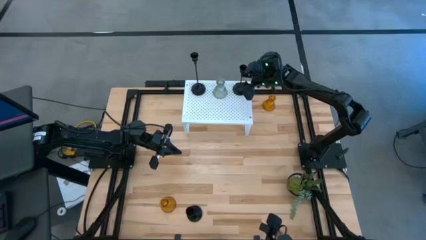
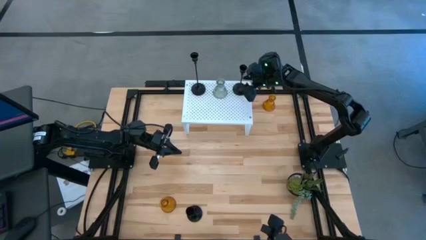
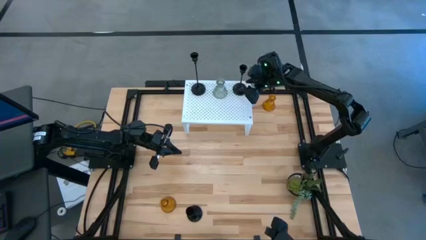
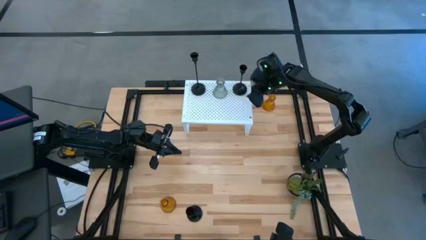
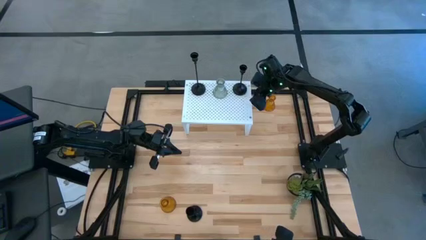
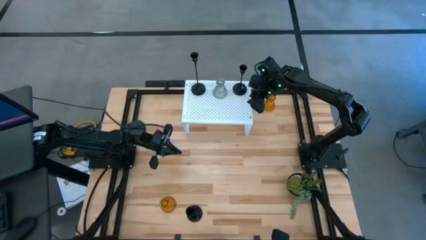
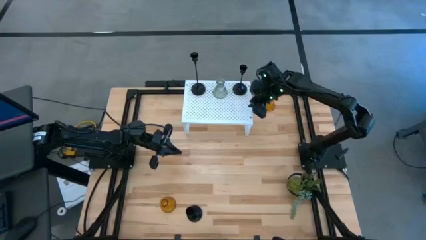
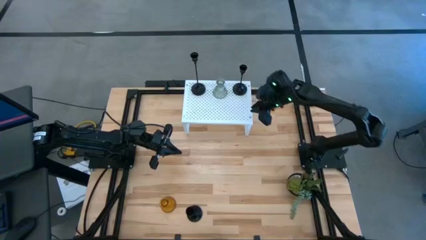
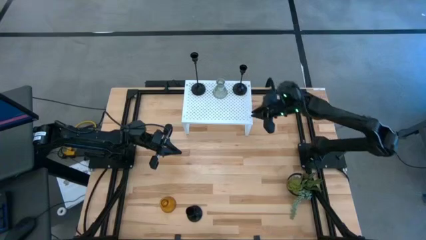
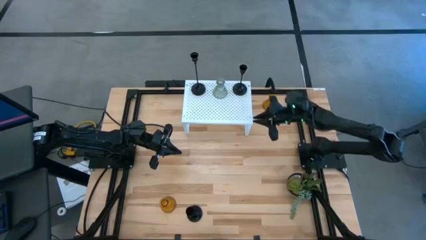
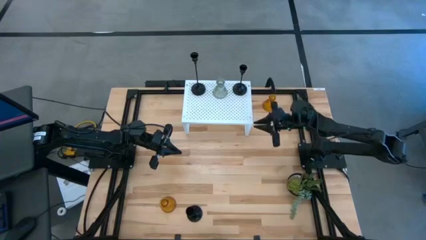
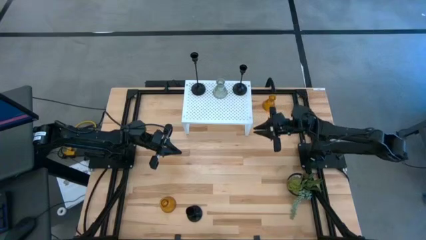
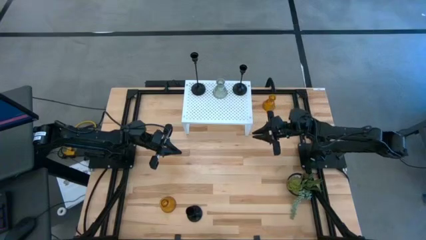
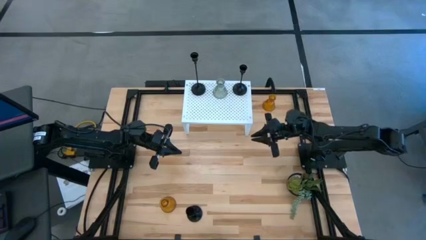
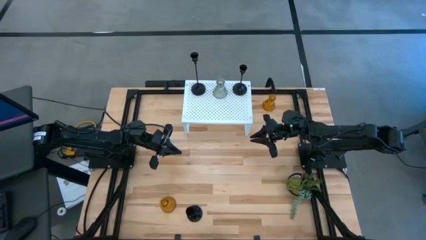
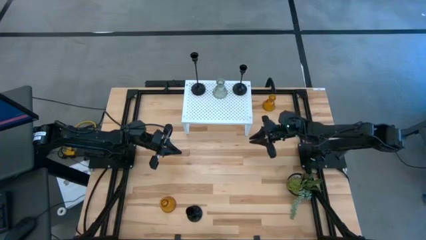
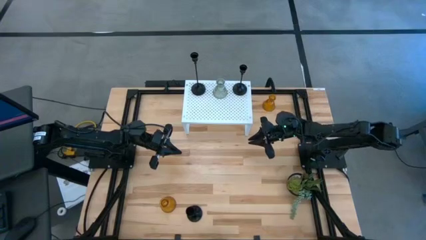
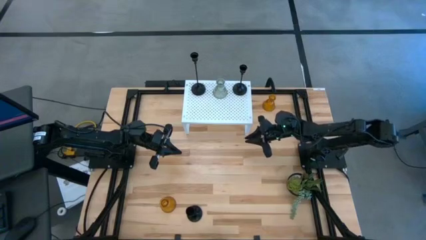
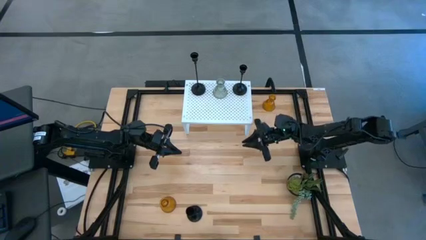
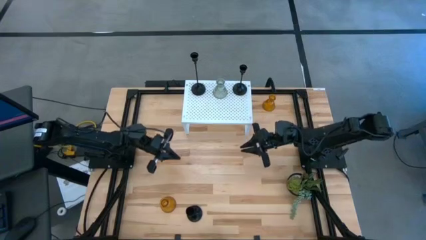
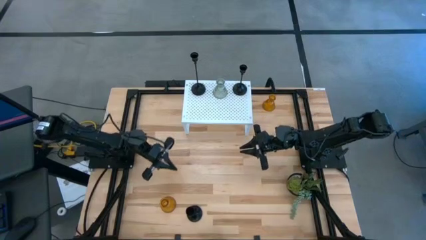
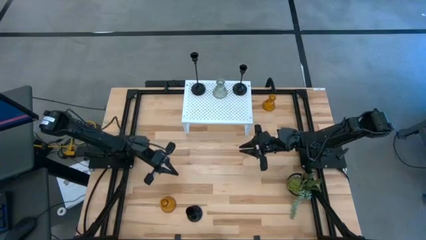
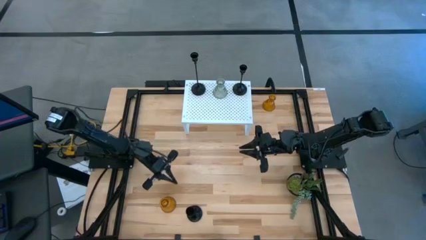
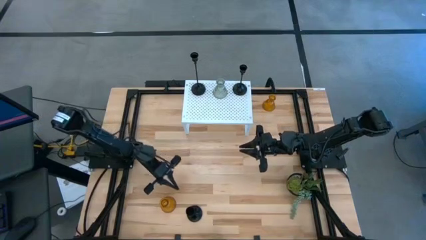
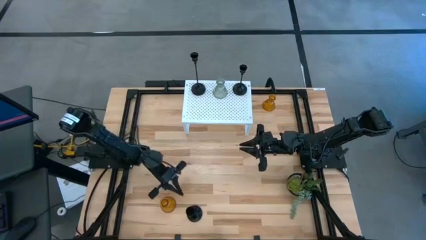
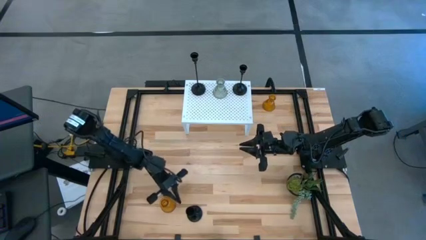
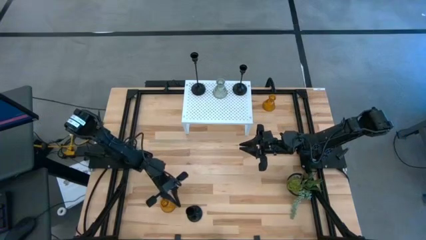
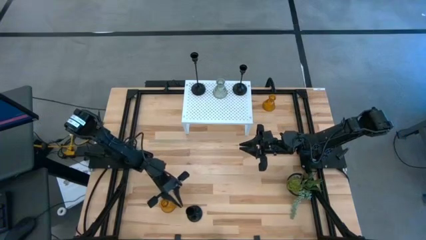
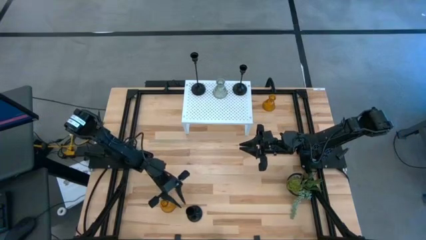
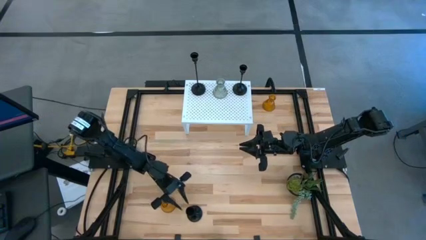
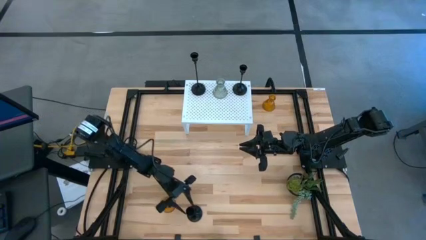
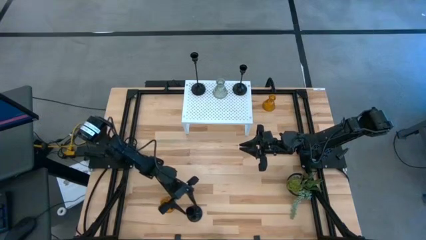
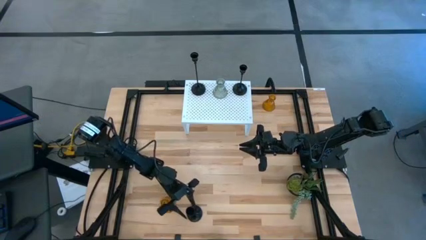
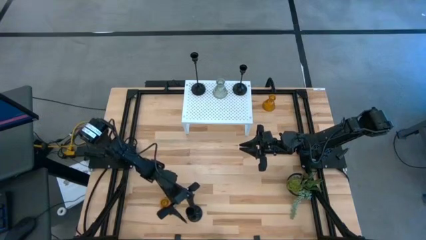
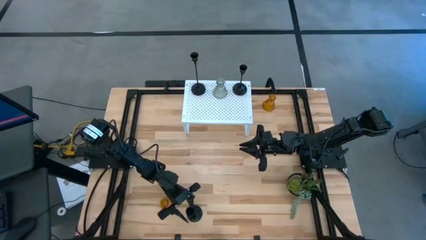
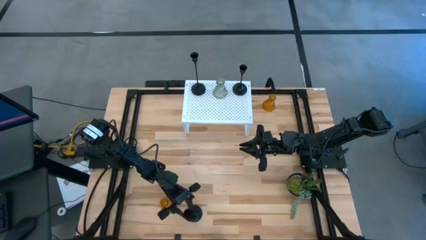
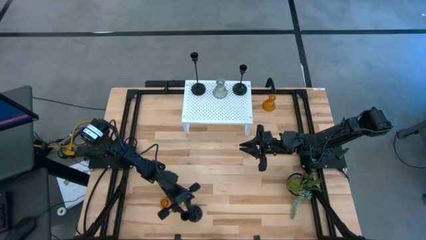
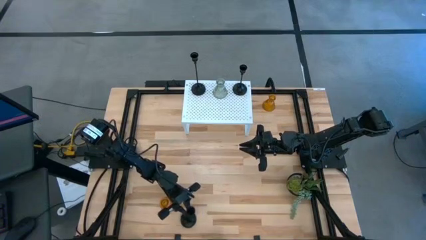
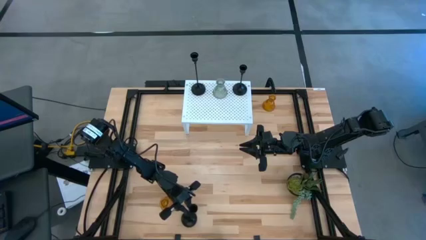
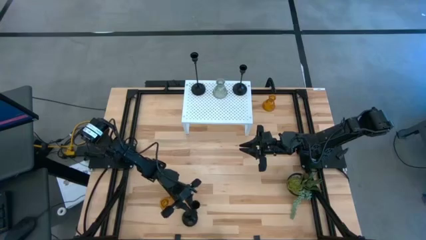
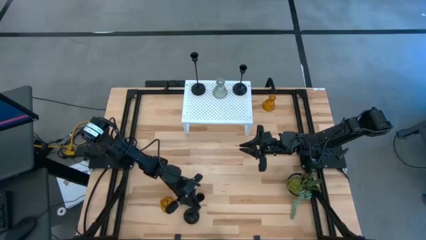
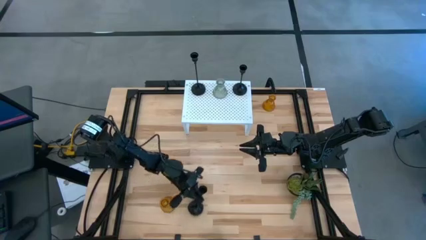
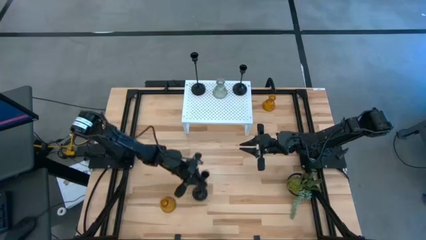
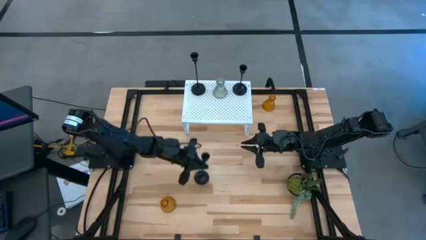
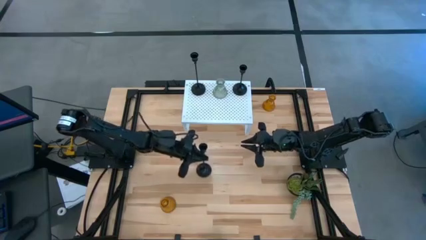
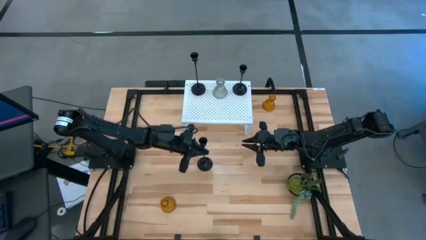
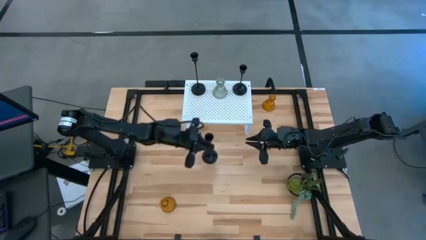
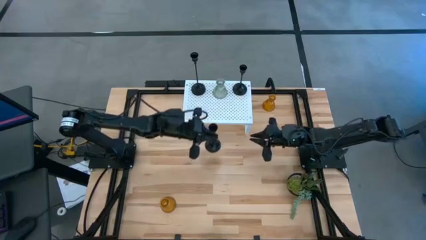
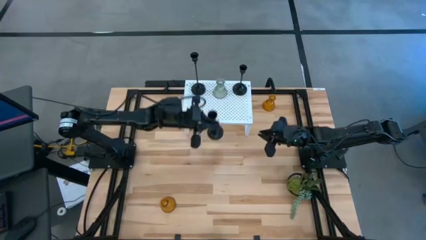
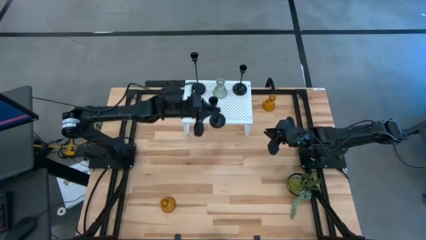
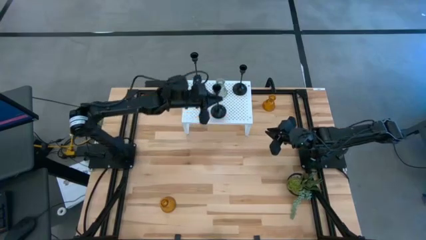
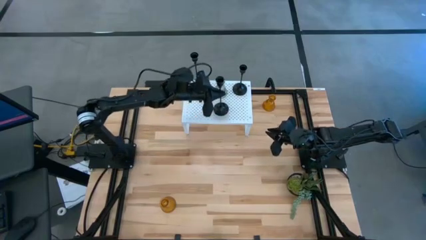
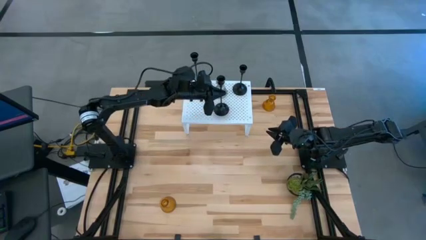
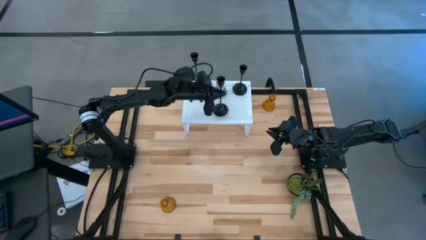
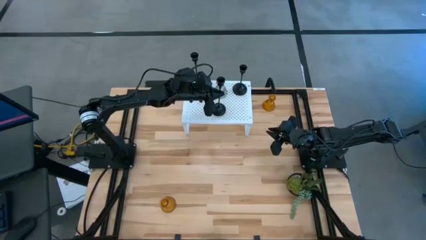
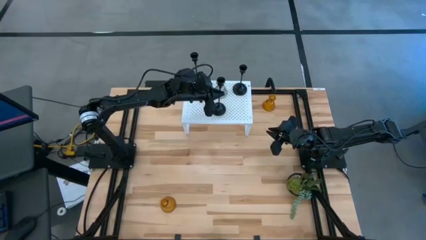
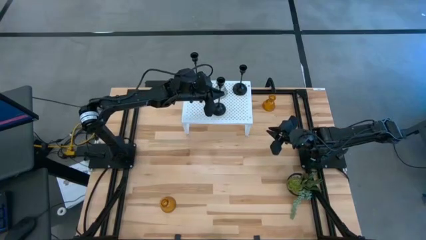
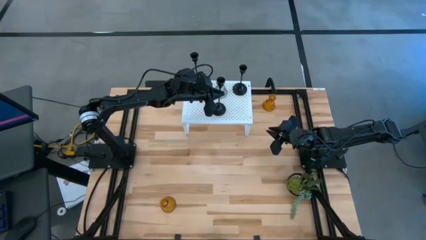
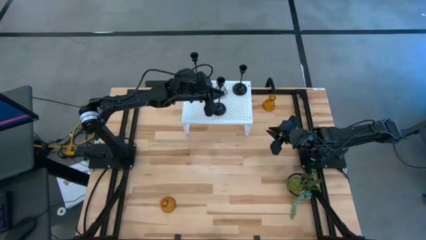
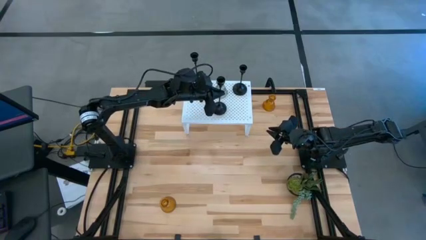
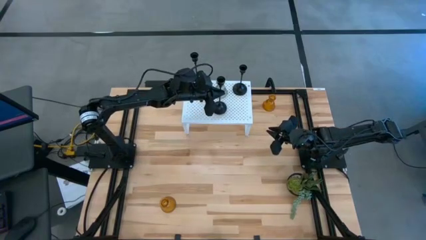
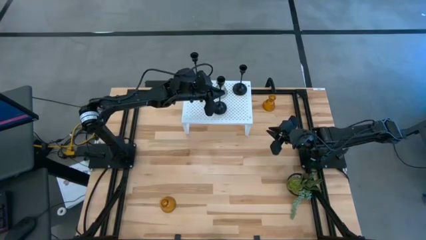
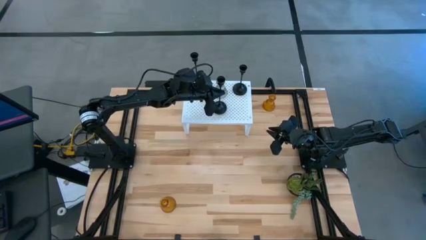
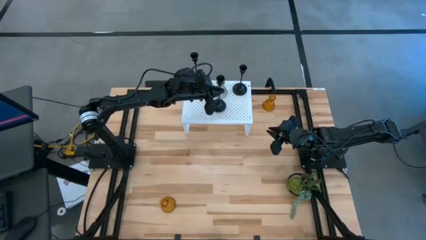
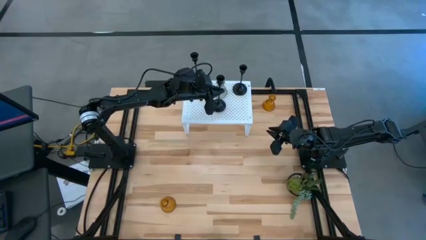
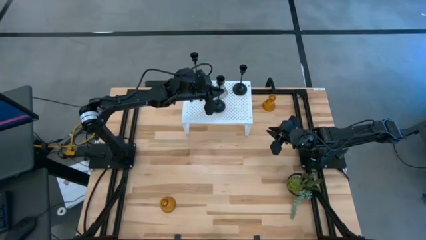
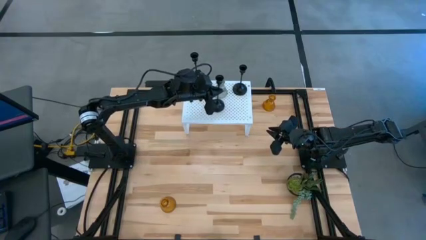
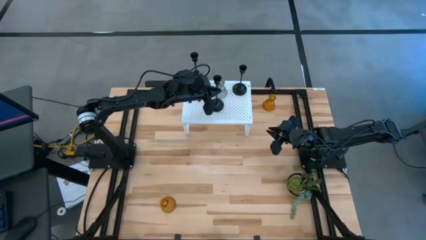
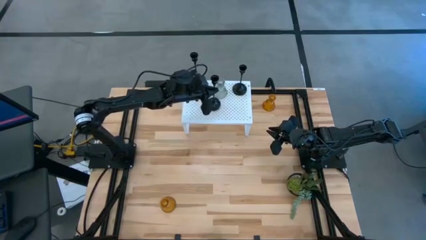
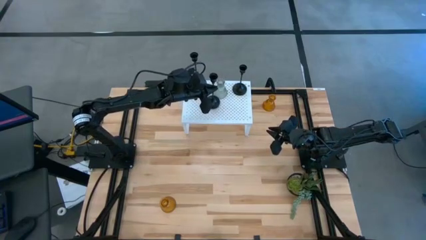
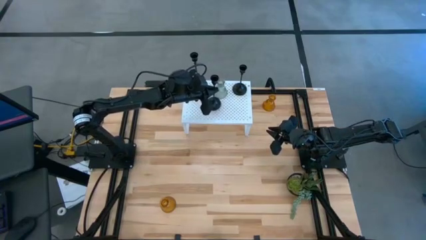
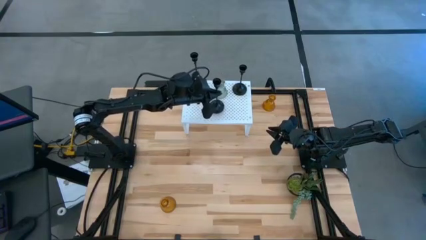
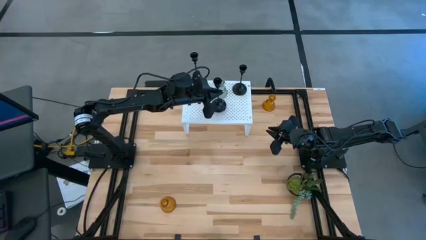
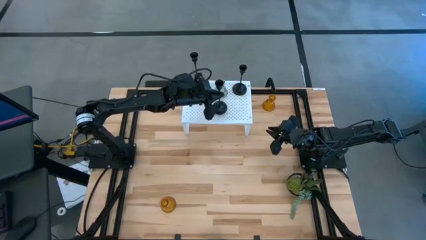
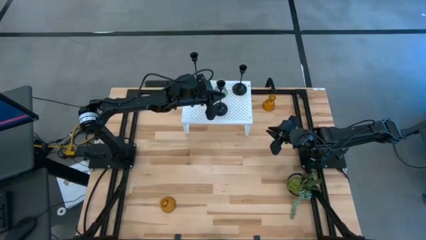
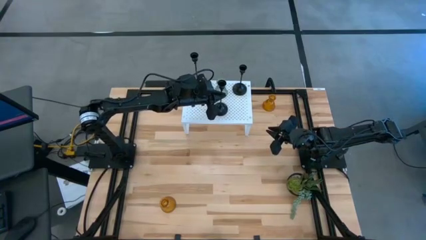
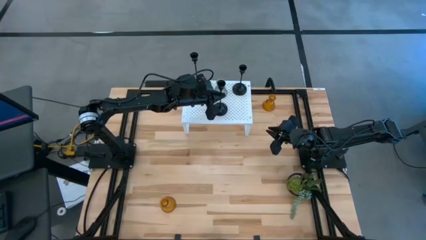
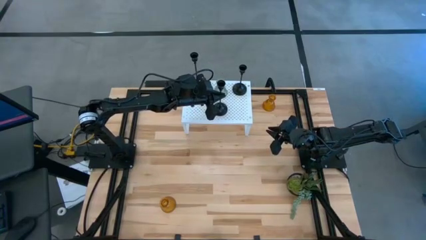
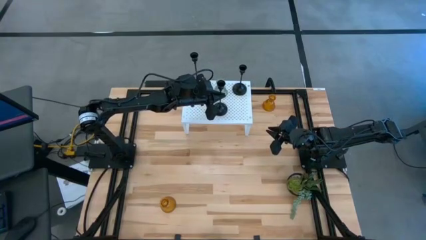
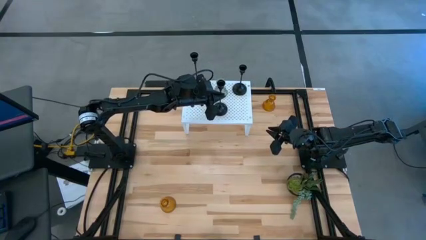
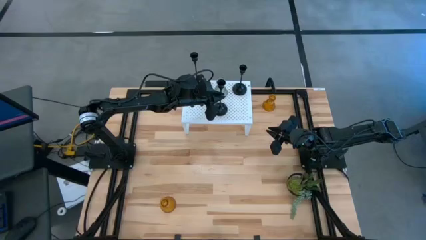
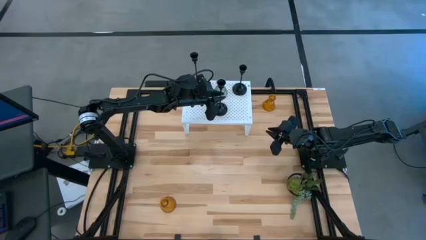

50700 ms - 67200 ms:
Task: Pick & Place candle stick holders
Put the black candle holder on the shelf
